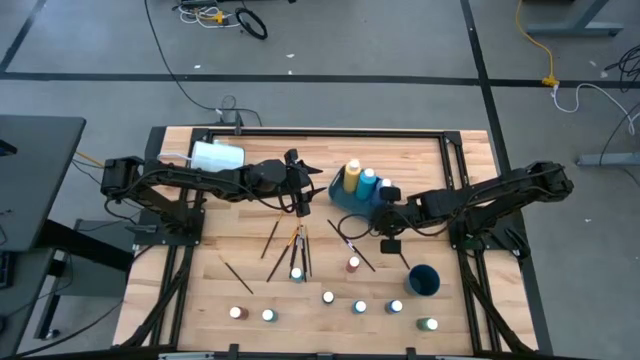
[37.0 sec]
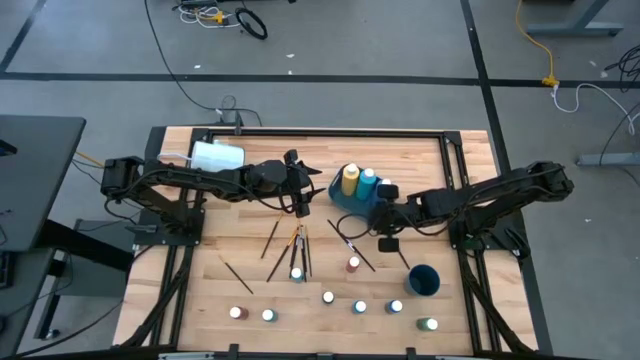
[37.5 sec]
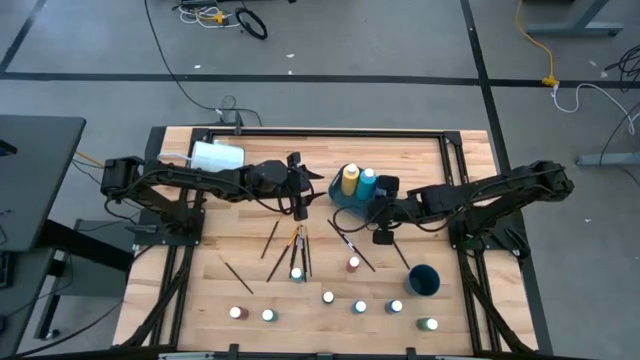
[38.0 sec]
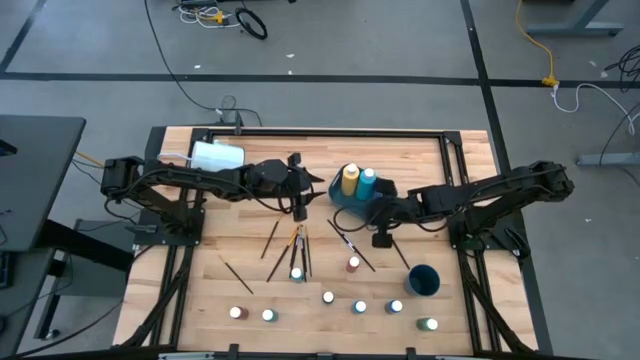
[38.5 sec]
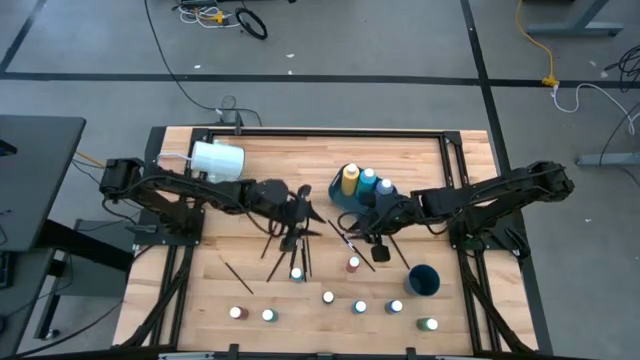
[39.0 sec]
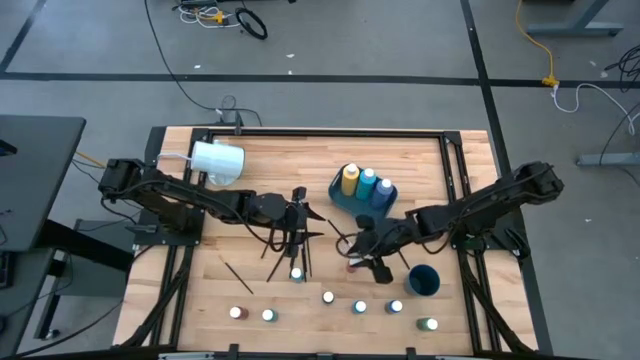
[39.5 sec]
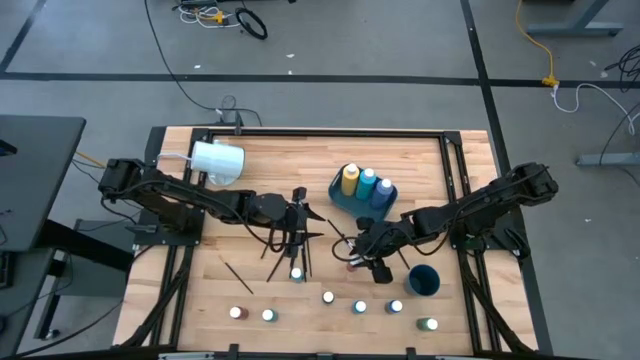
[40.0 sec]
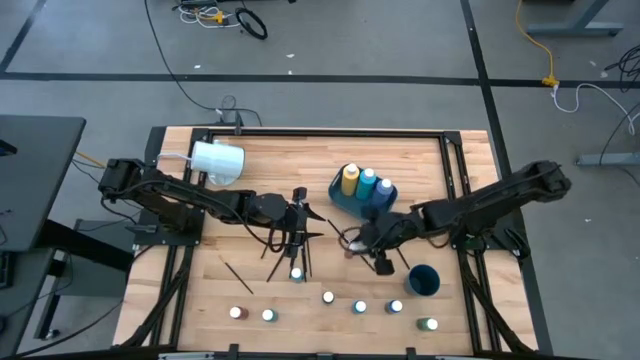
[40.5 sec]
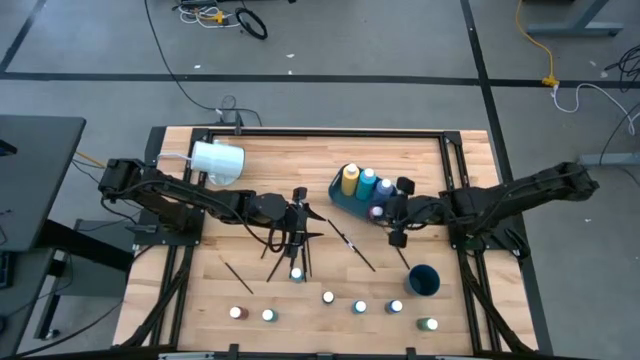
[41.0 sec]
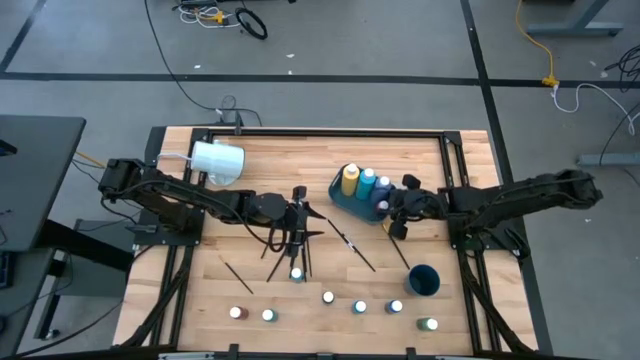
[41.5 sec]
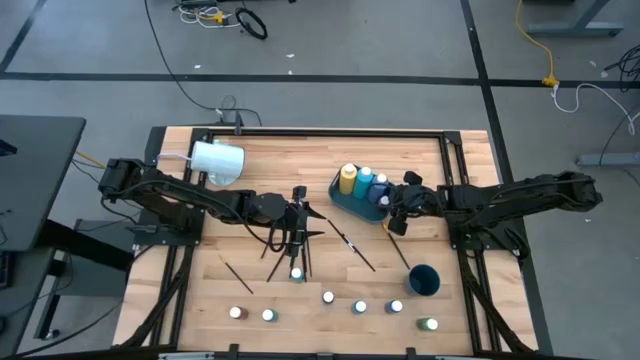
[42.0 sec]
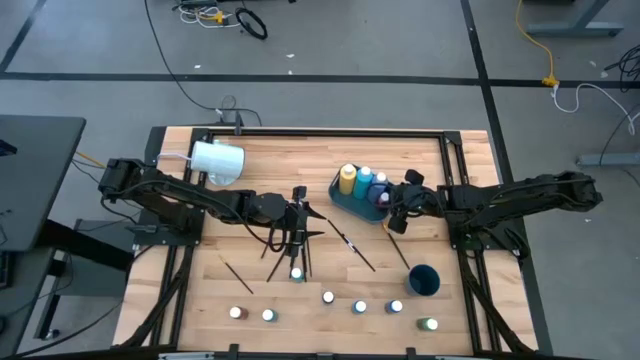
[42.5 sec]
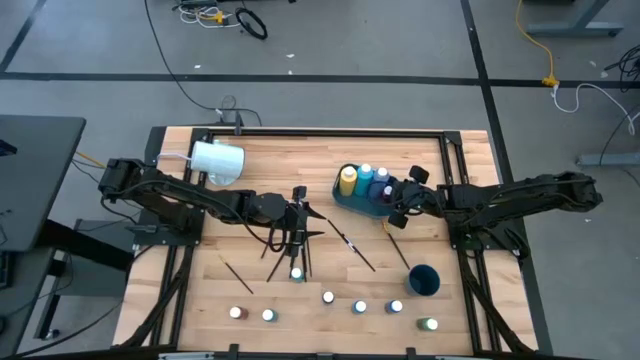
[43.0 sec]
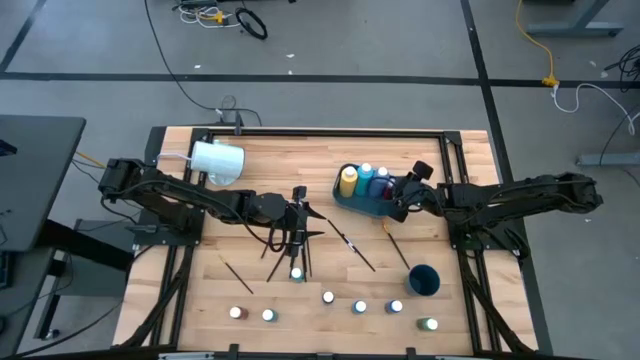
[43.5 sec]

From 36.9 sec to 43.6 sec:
Task: Pick & Place Paint Supplies
Put the top small red paint bottle into the bin

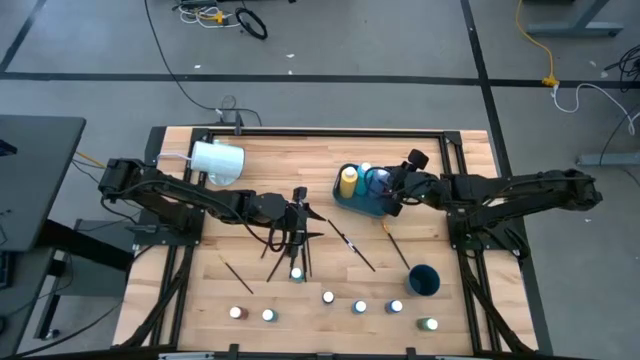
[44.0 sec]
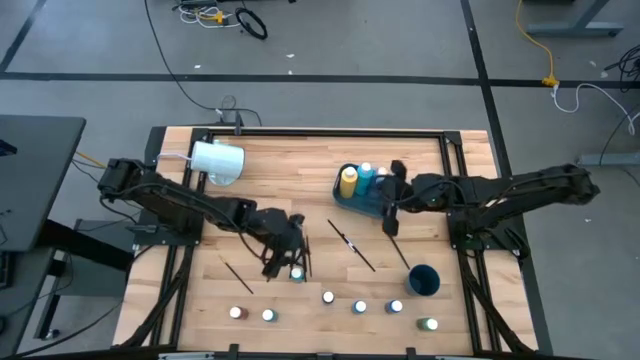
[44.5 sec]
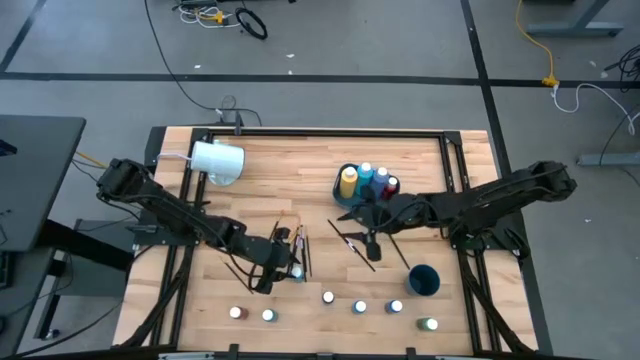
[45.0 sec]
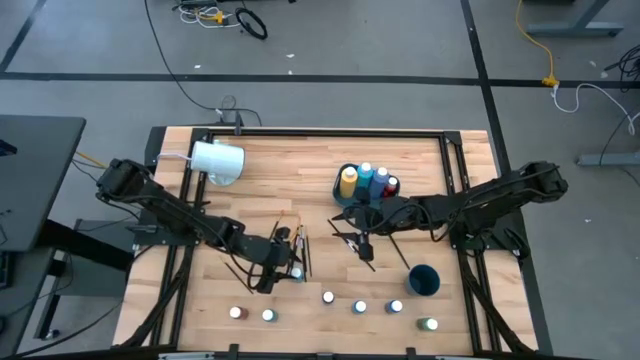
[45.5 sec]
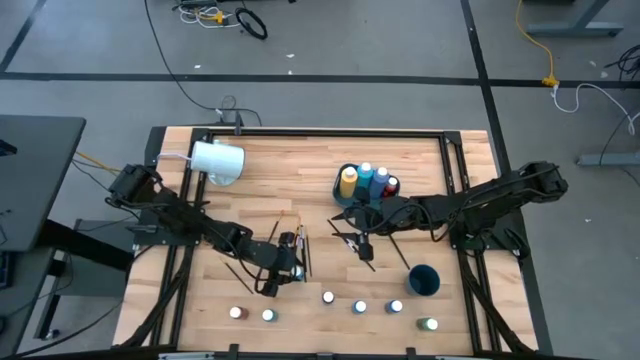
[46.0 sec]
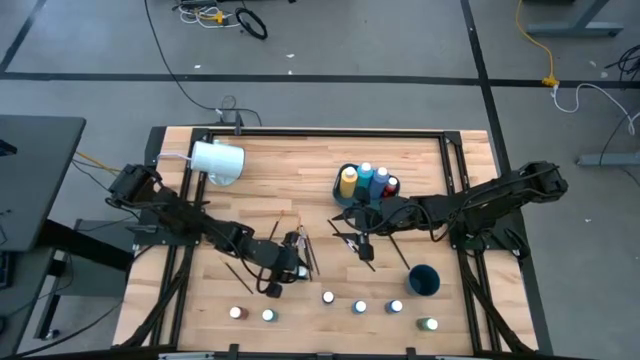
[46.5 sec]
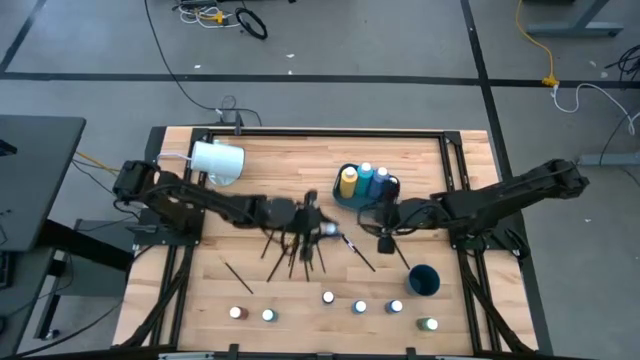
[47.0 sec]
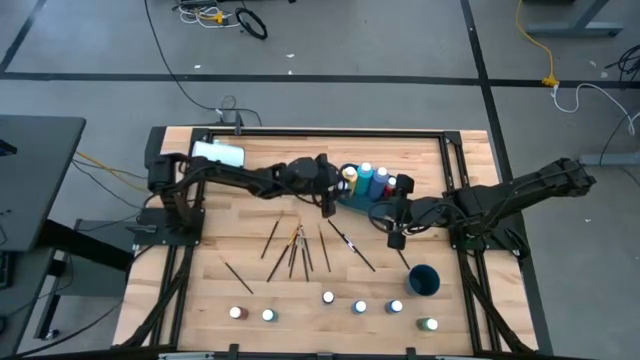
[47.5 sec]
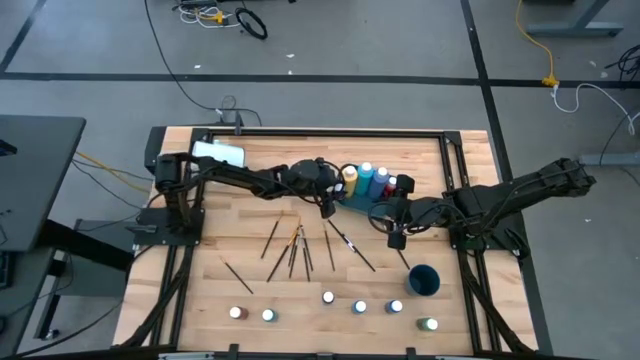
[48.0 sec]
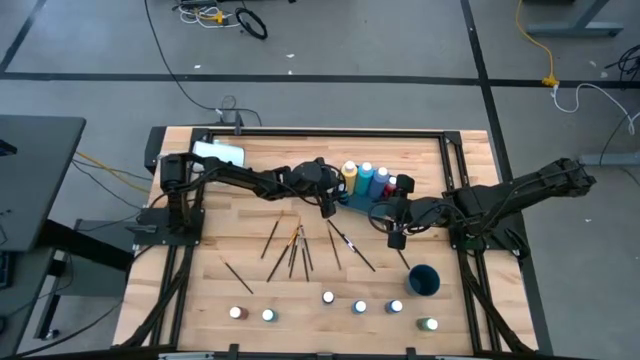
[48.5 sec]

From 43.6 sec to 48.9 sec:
Put the small light blue paint bottle into the bin

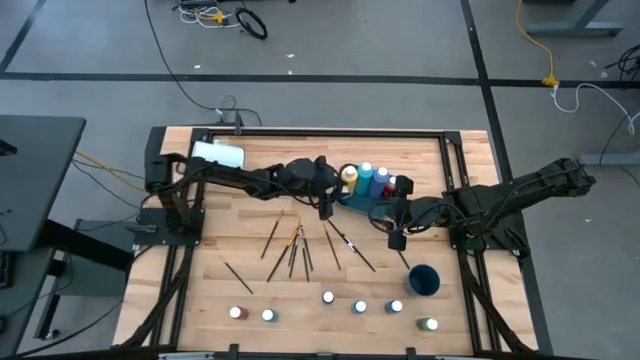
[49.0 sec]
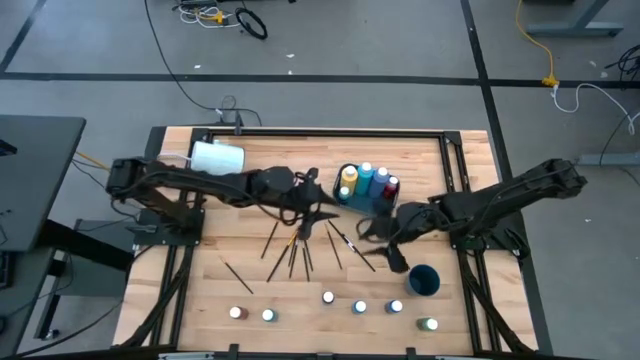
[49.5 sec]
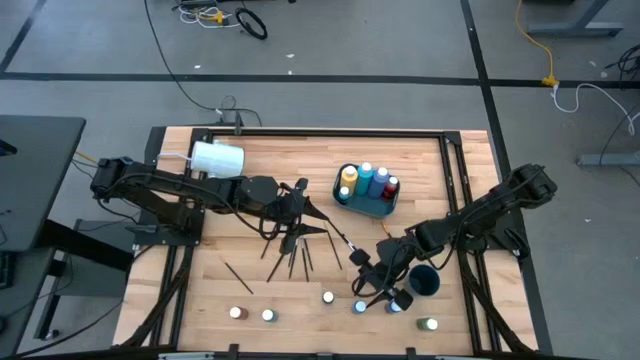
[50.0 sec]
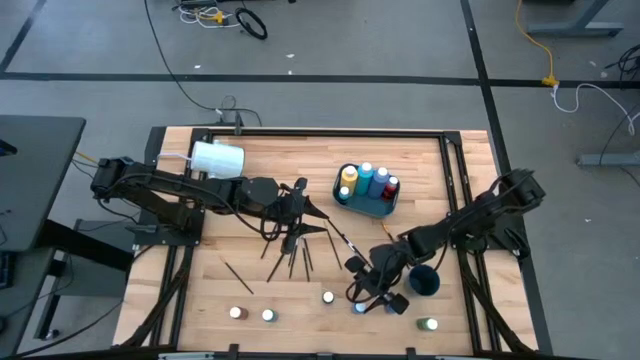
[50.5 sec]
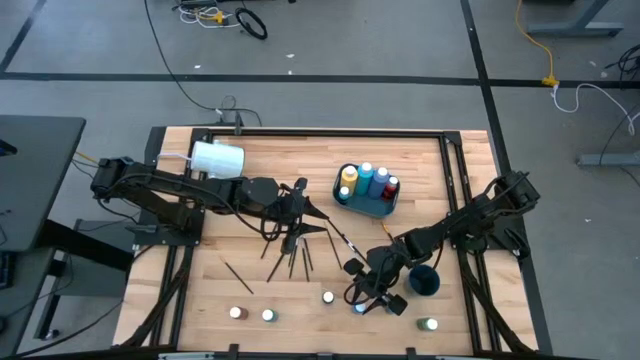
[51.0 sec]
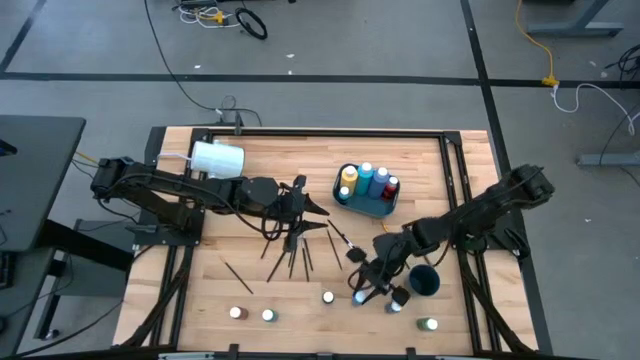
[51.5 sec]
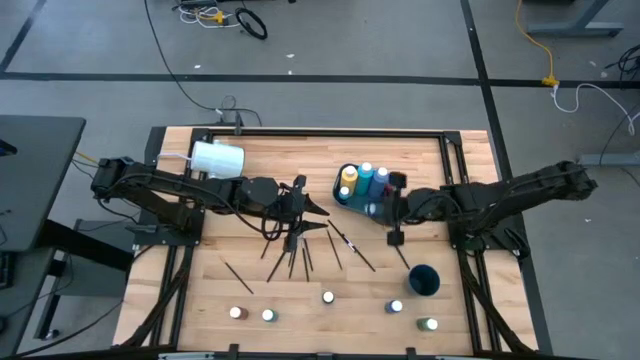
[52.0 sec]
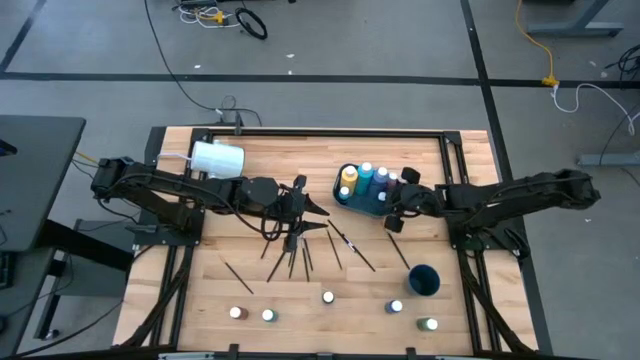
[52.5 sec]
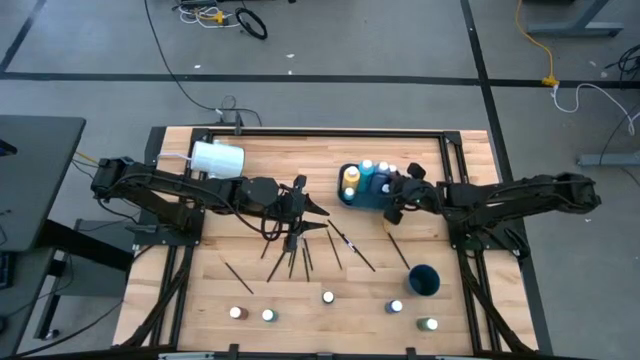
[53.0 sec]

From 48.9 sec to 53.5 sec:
Put the small blue paint bottle into the bin

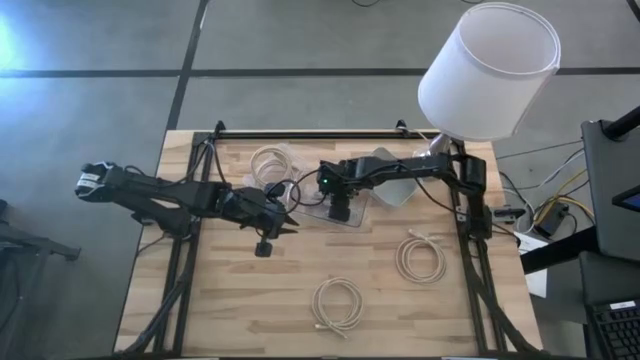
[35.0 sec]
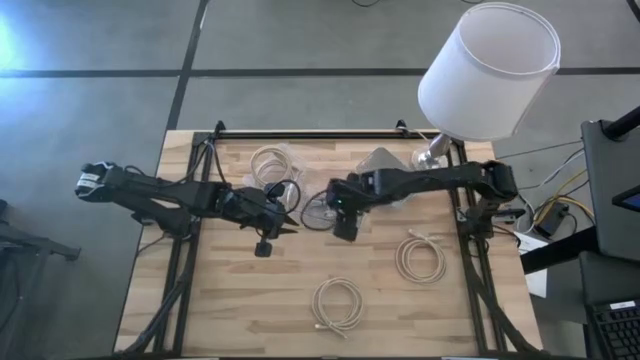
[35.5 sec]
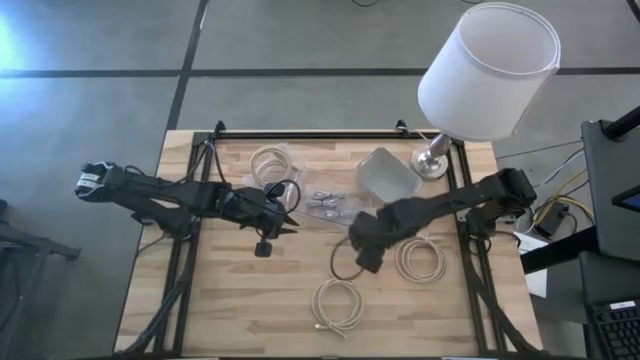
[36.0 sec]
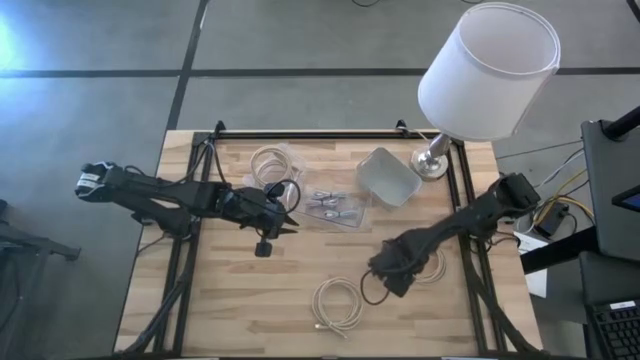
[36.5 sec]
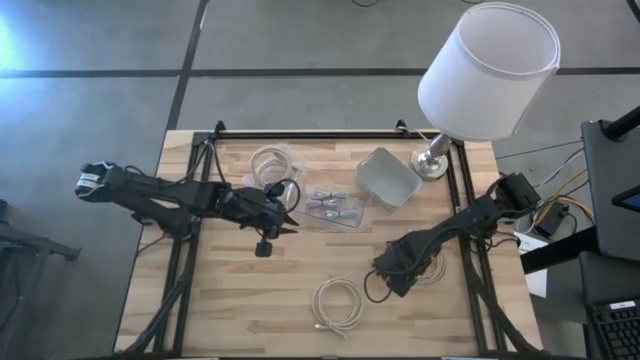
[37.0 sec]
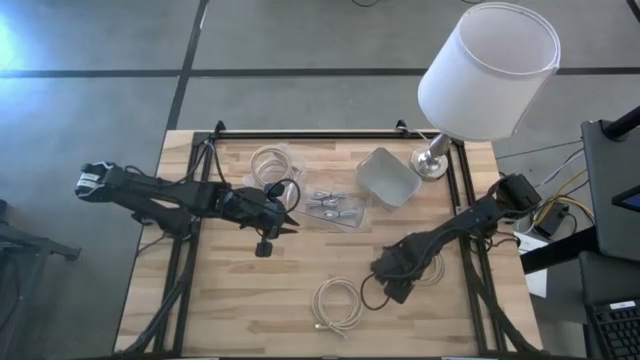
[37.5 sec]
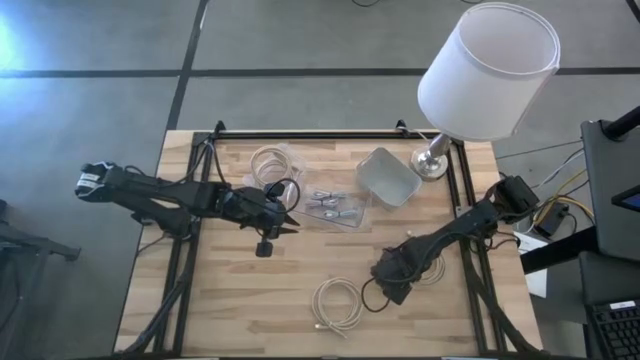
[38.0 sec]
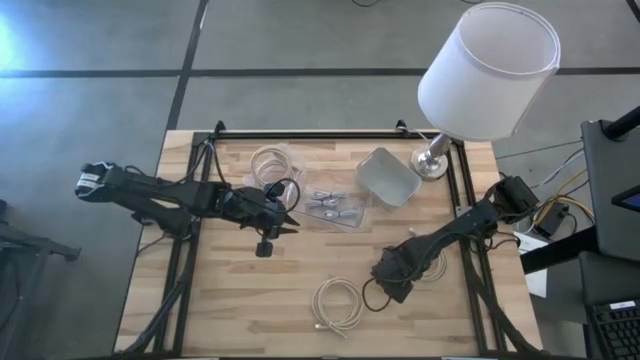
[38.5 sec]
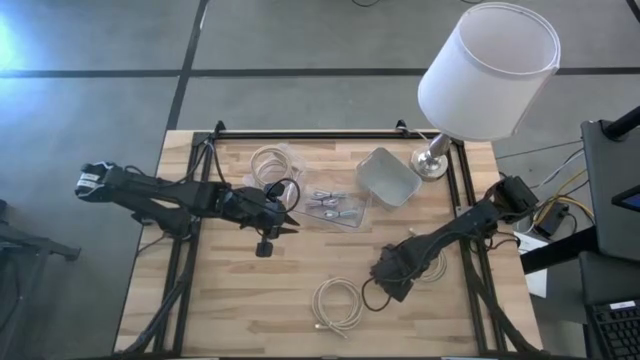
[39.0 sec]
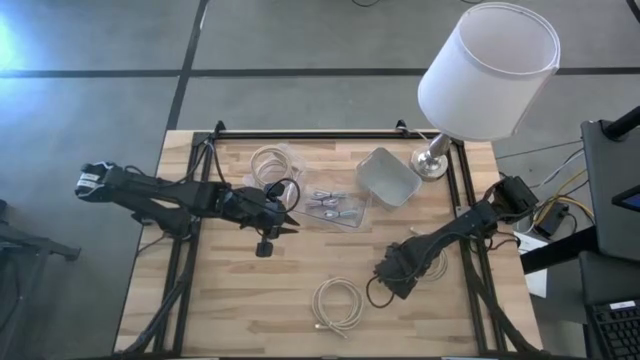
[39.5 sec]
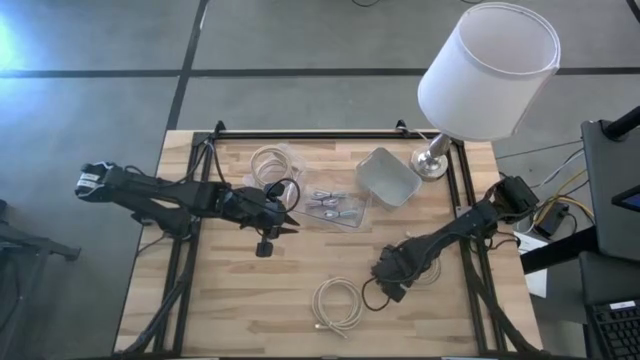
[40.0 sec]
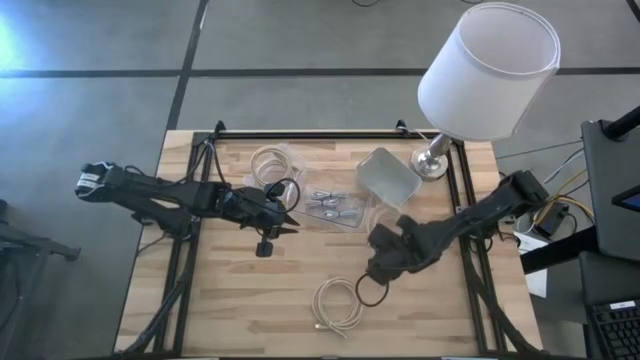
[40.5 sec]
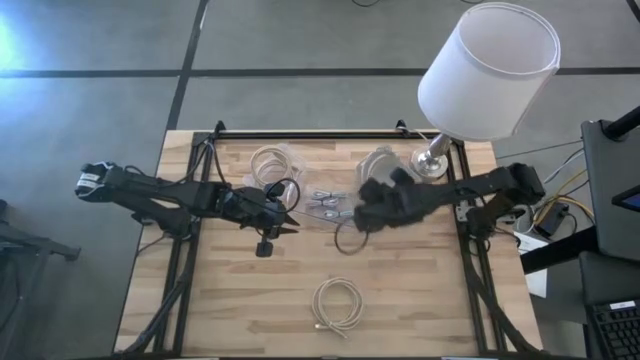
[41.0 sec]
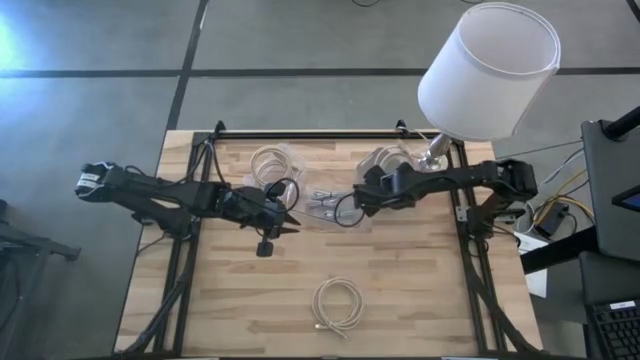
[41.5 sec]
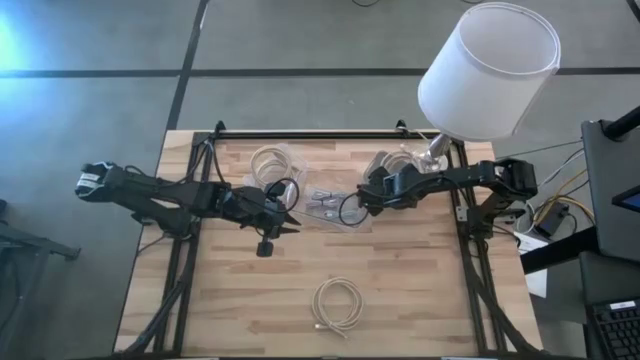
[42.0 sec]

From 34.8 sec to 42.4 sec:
Task: Pick & Place USB Port
Put the brown USB cable into the gray bin
